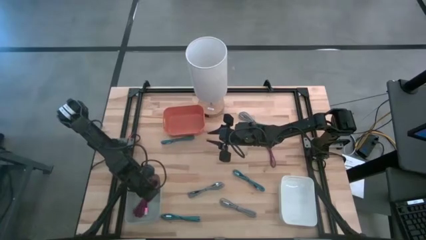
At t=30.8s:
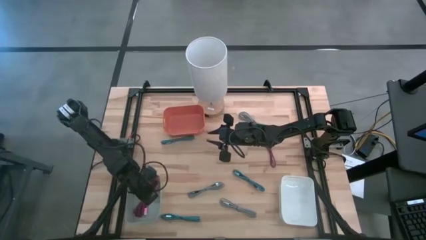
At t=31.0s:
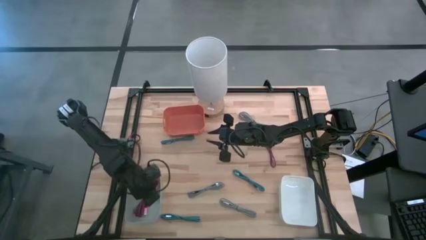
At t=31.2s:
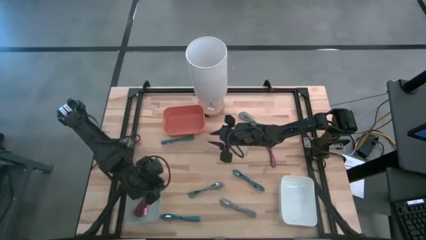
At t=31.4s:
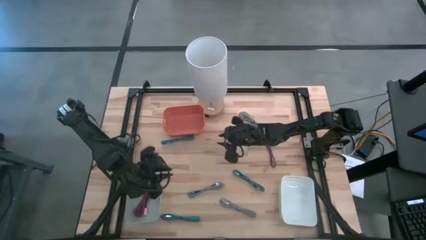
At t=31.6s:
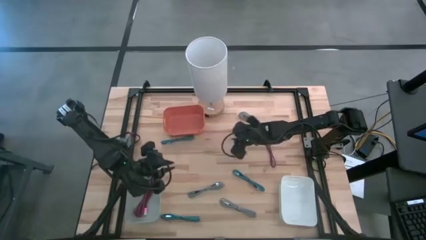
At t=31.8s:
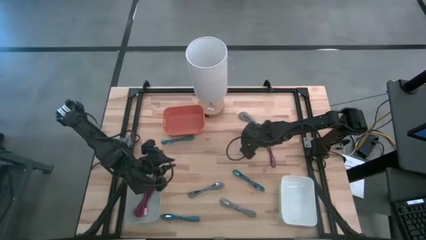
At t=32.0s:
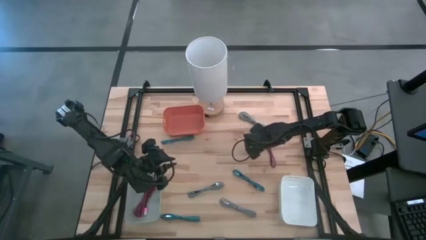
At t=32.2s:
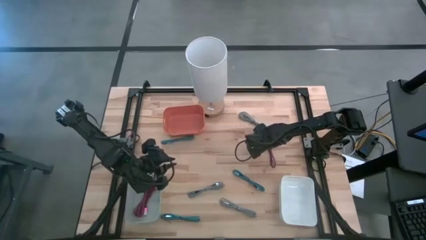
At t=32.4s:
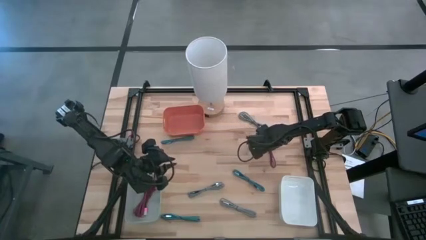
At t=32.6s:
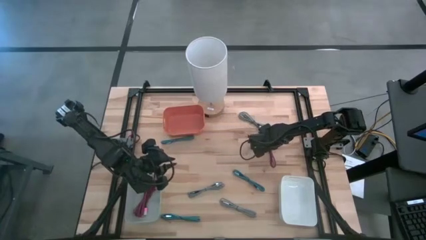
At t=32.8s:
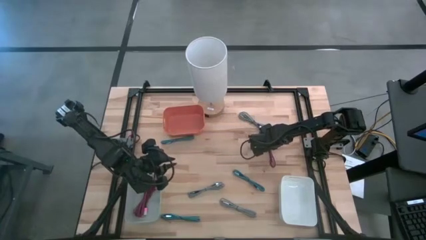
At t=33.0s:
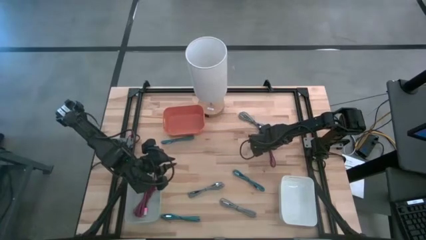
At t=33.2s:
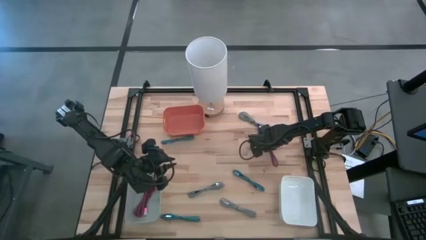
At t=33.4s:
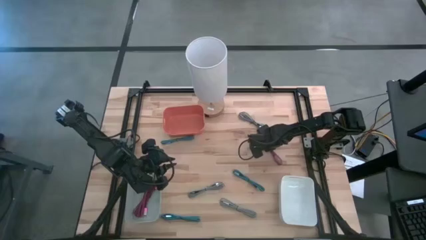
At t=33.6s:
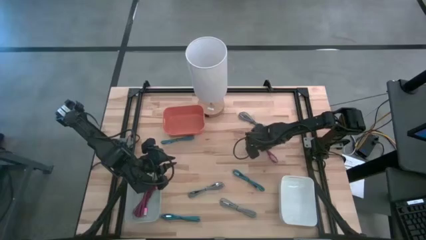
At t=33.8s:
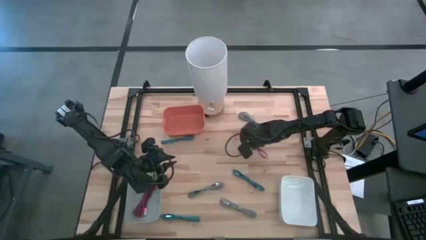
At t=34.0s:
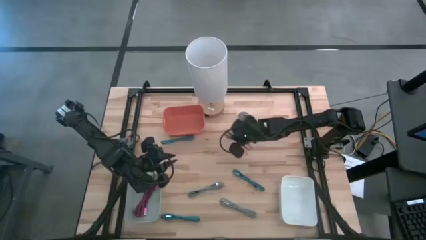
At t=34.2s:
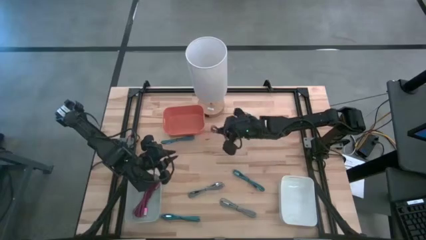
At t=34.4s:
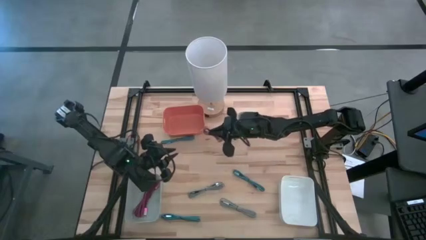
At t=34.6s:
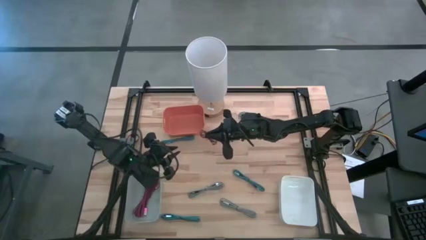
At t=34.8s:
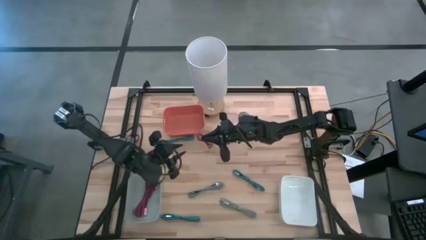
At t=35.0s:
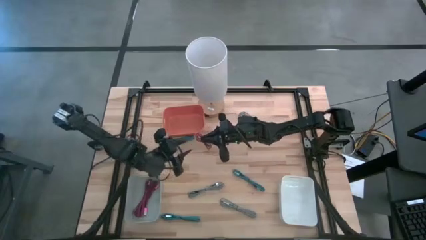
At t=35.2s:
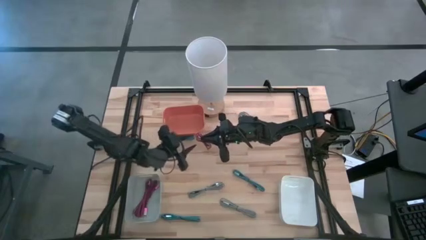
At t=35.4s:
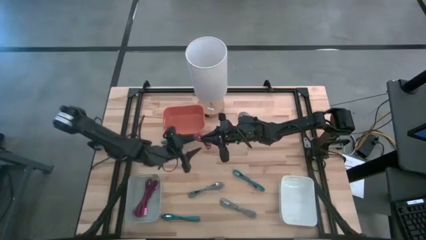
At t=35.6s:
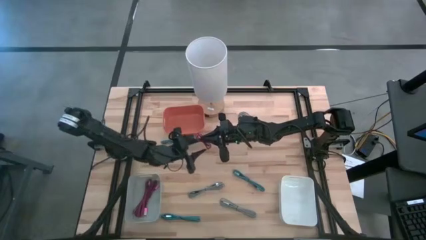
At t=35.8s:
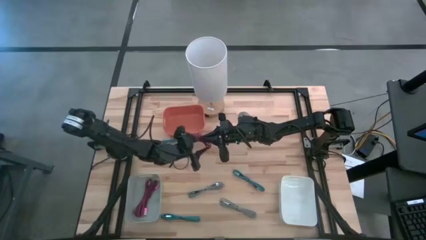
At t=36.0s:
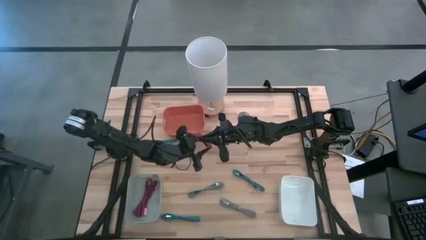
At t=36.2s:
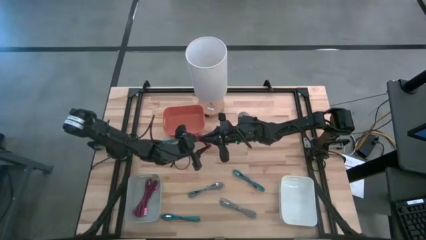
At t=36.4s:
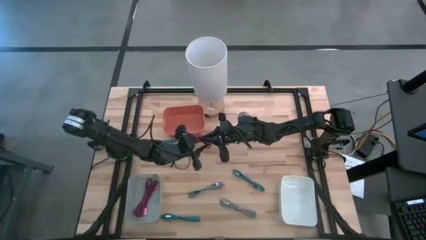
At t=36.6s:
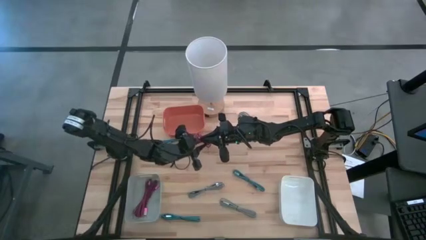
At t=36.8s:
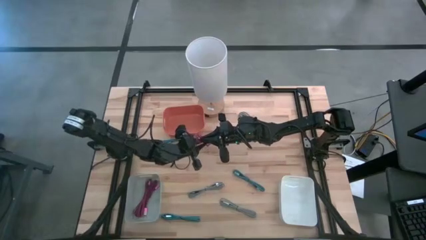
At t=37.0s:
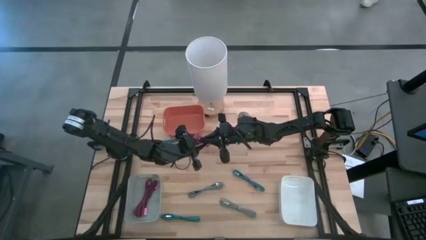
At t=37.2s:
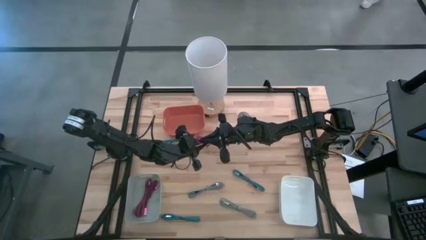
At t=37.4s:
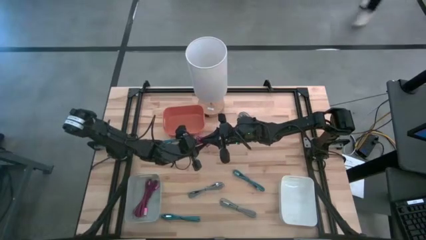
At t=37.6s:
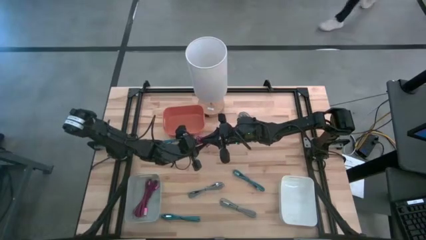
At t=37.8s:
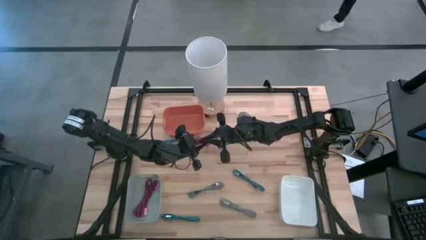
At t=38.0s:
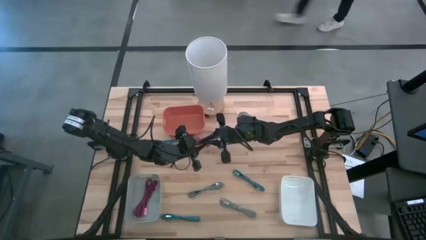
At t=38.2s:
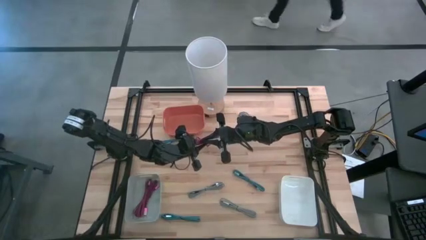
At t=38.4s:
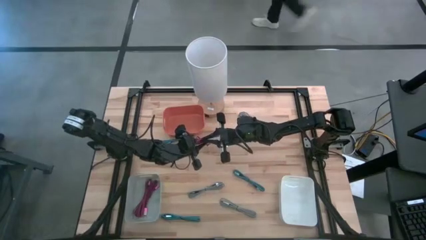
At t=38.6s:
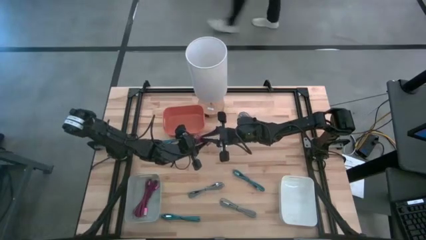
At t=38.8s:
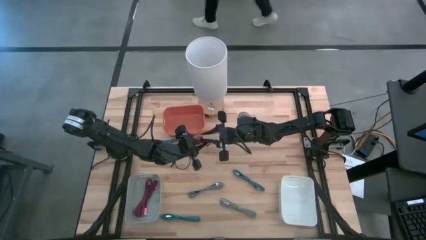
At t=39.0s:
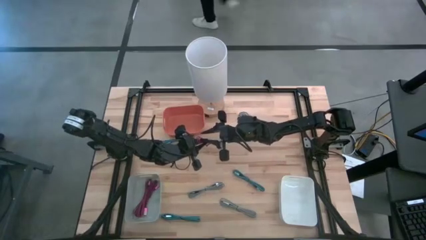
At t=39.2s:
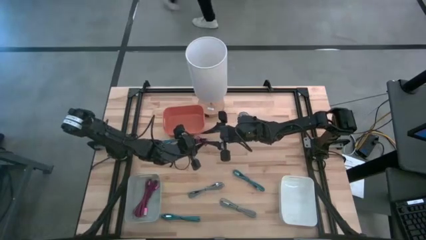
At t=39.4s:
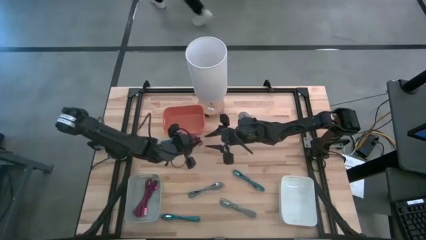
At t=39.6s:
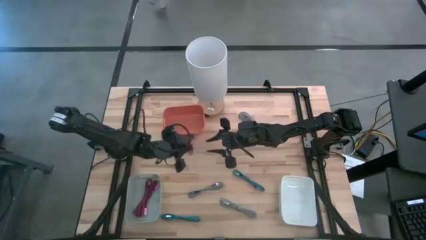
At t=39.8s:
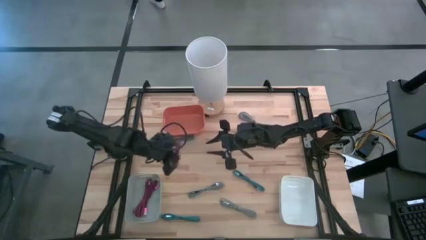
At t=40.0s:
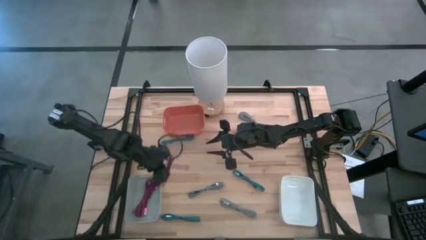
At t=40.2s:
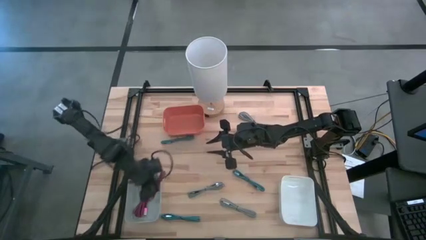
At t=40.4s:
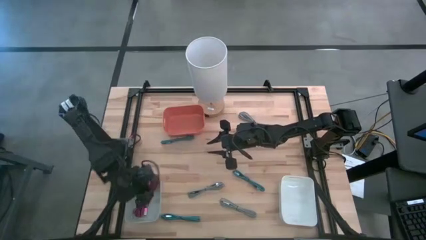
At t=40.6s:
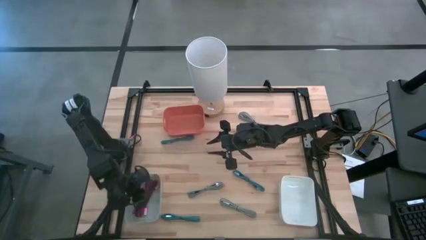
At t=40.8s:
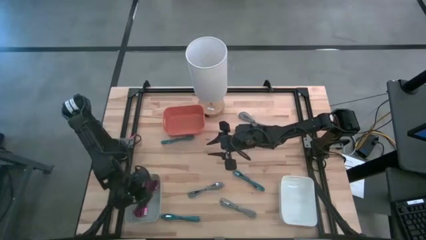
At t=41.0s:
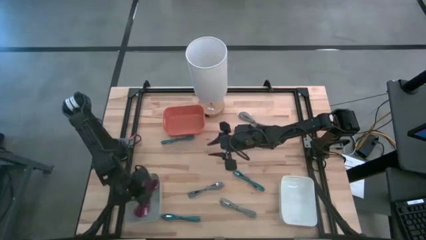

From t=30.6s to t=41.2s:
Task: Pick & Place USB Port
Put the pink charger cable into the gray bin

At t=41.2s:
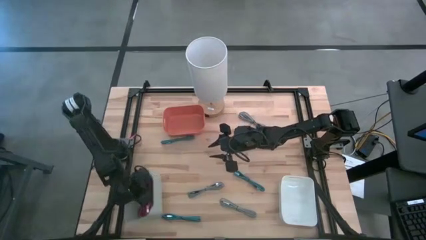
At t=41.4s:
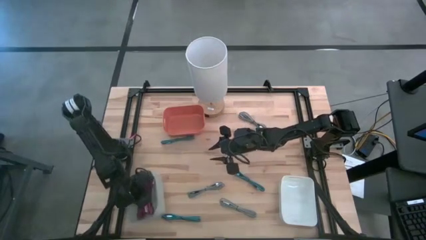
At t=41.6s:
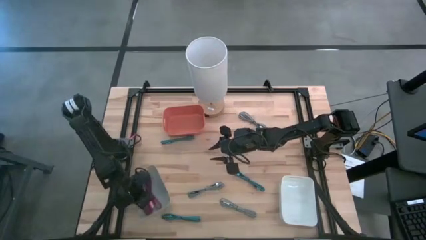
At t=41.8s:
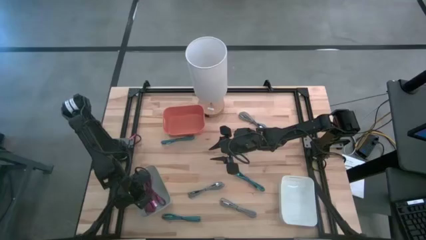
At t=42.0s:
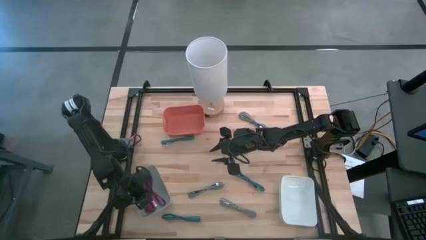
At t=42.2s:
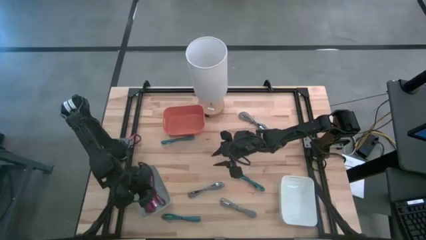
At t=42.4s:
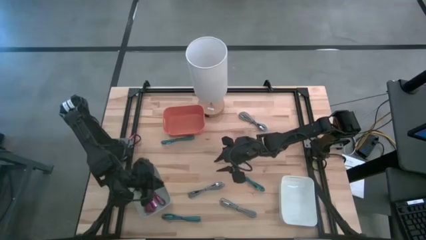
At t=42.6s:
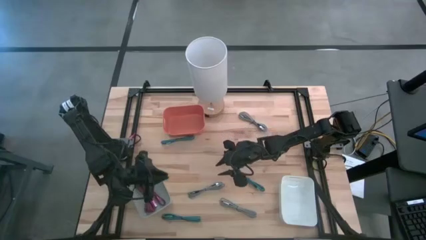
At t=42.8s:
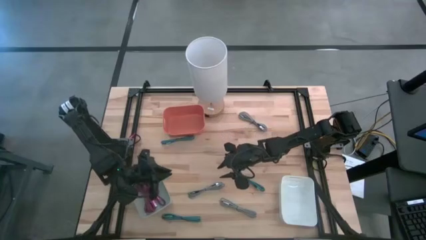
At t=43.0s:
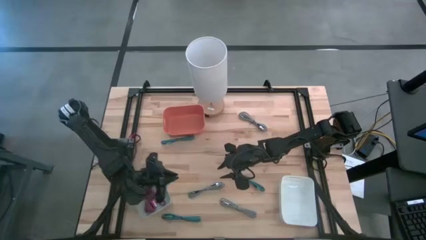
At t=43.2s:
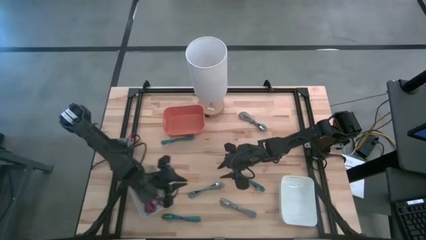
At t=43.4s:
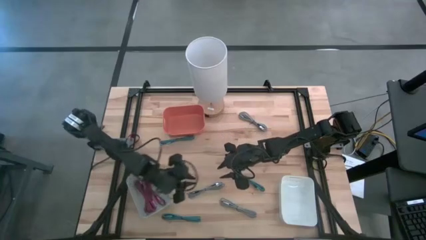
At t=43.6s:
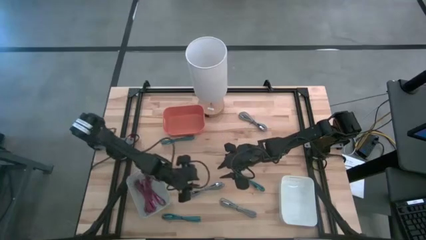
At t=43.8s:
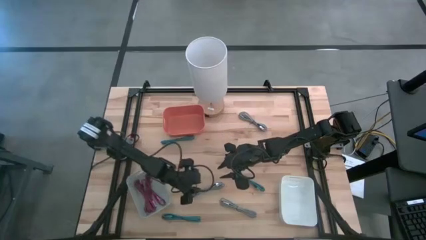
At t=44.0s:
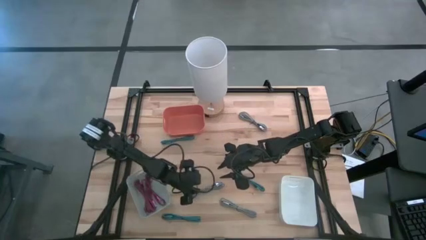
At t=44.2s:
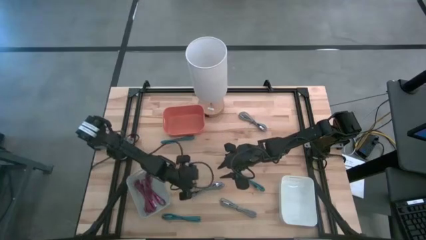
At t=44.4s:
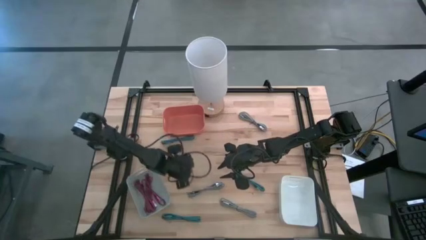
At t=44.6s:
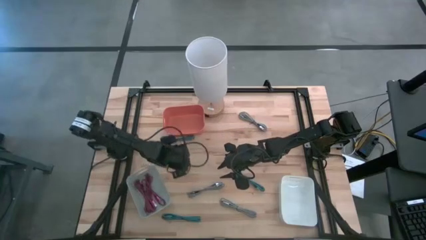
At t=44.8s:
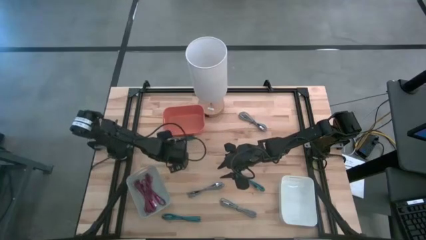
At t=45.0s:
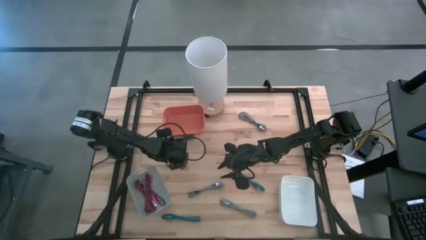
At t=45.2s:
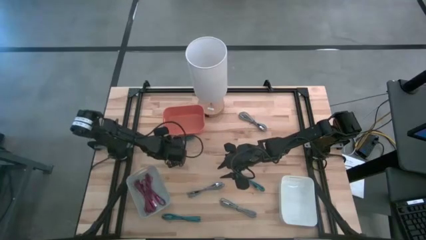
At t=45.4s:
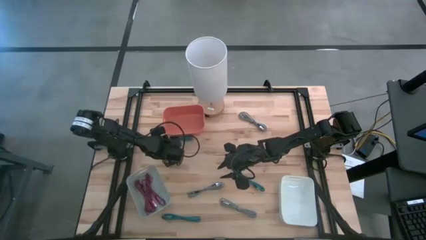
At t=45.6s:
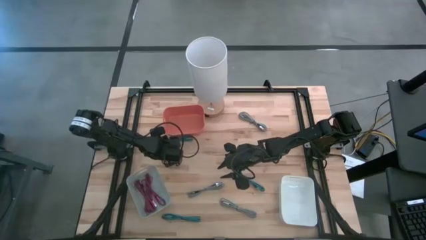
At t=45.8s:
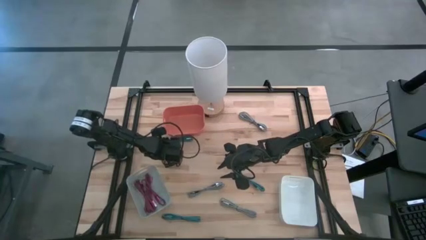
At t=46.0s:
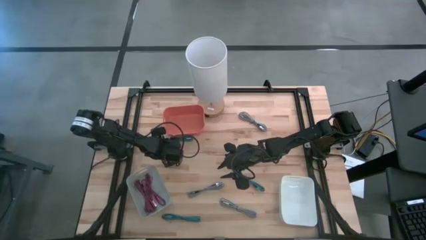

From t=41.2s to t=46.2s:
Put the top left blue charger cable into the orange bin

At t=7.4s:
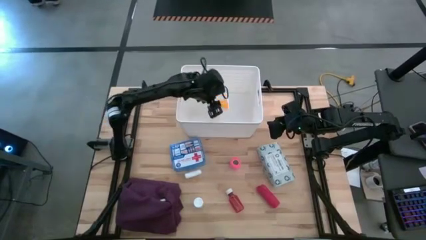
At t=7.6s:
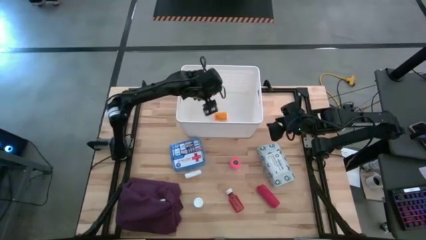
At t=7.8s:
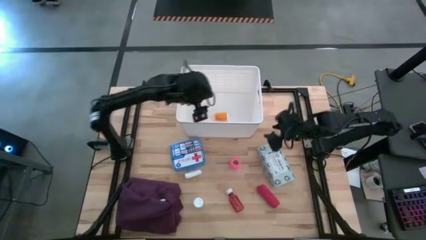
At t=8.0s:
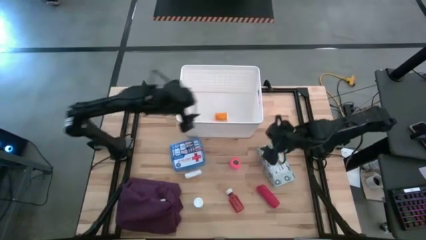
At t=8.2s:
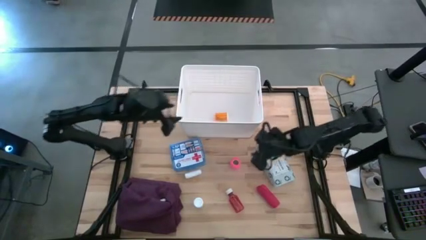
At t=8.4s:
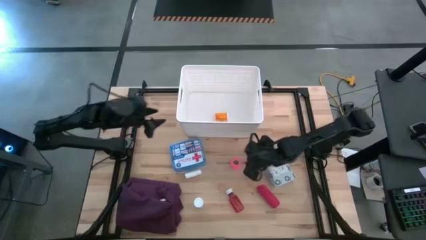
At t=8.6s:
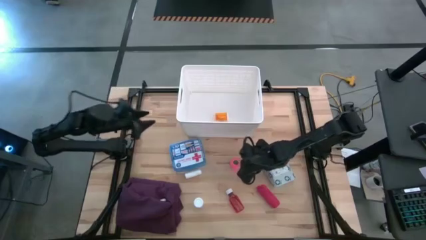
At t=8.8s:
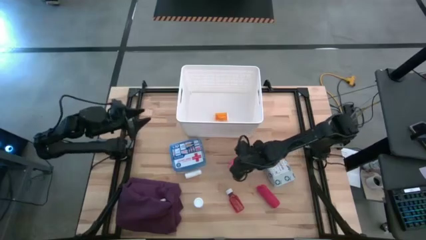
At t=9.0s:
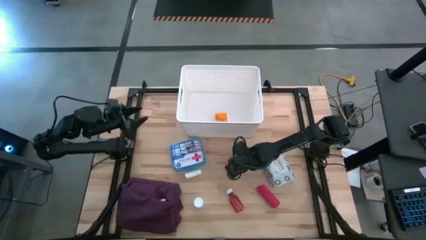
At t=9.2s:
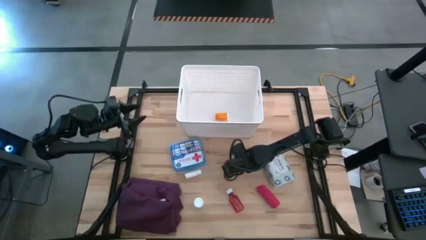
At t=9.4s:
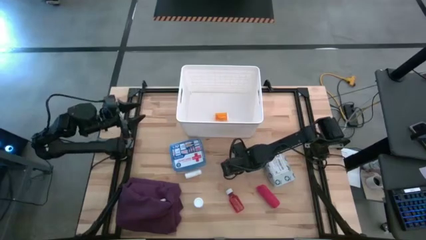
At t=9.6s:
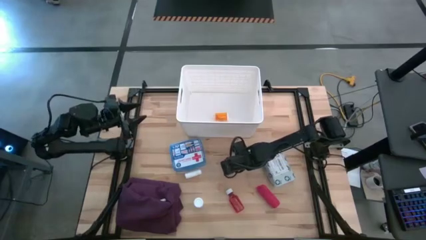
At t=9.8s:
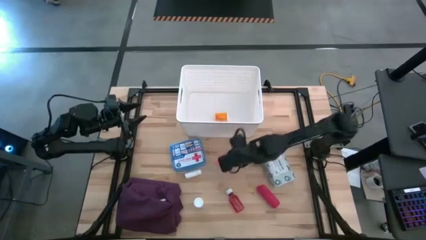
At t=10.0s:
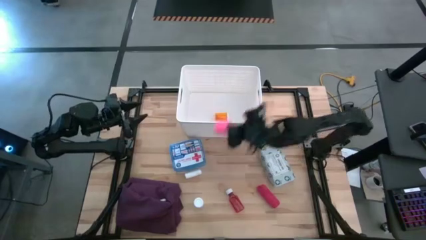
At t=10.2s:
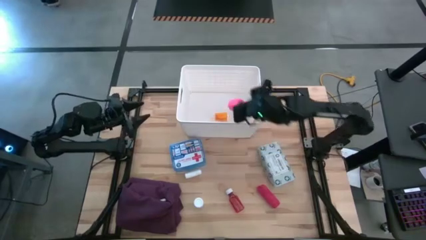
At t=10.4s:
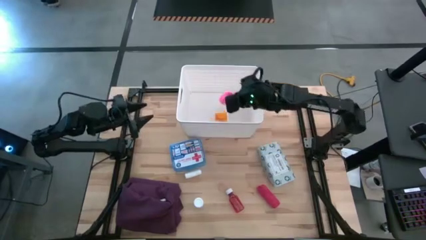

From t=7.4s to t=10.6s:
Task: Pick & place medical supplies in basket/bin
Put the pink bandage into the white bin
